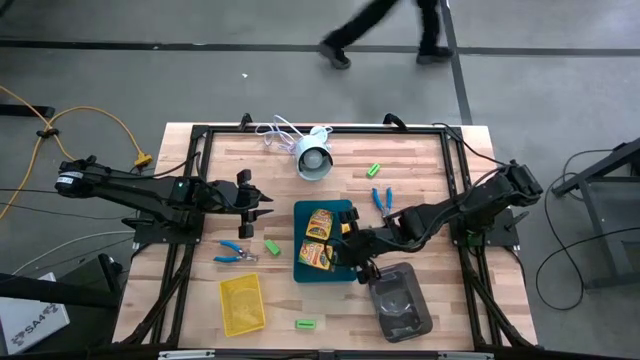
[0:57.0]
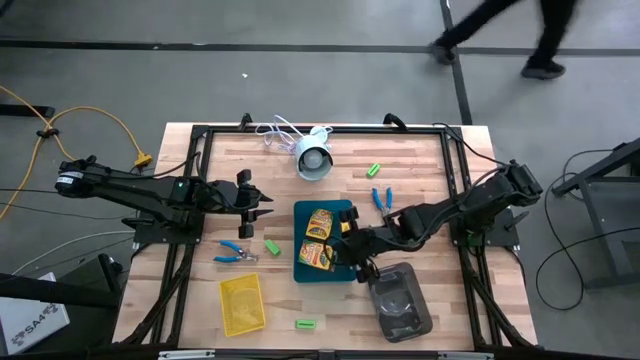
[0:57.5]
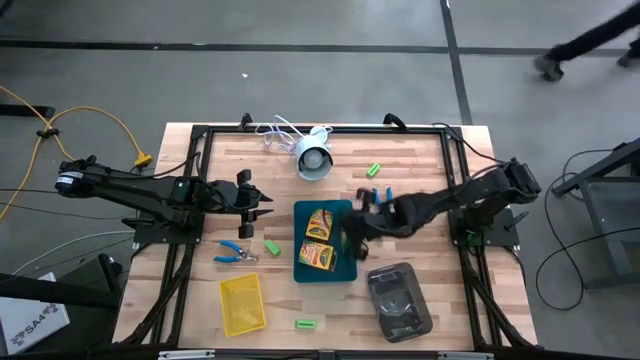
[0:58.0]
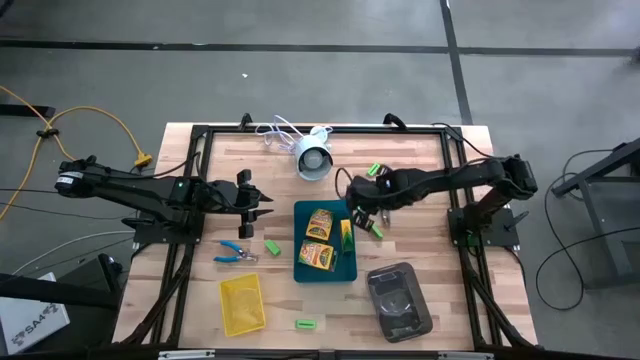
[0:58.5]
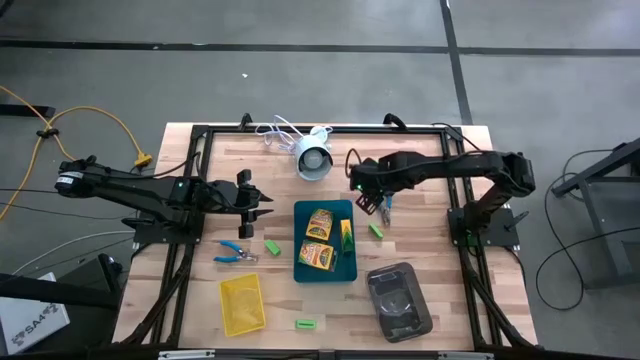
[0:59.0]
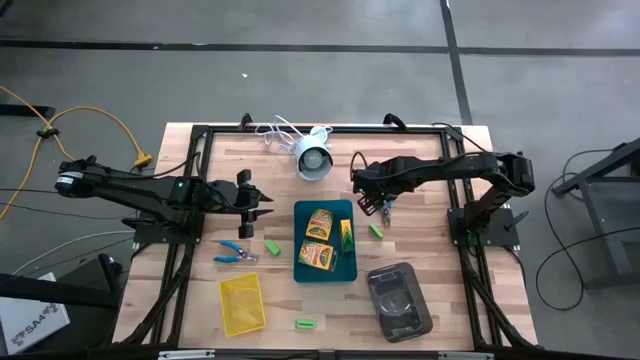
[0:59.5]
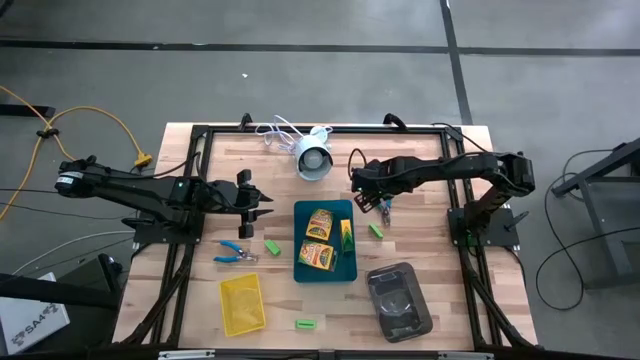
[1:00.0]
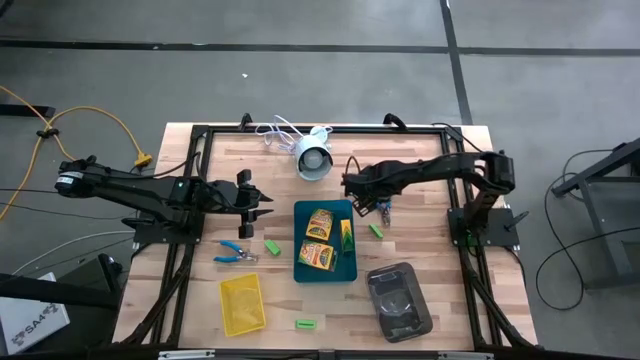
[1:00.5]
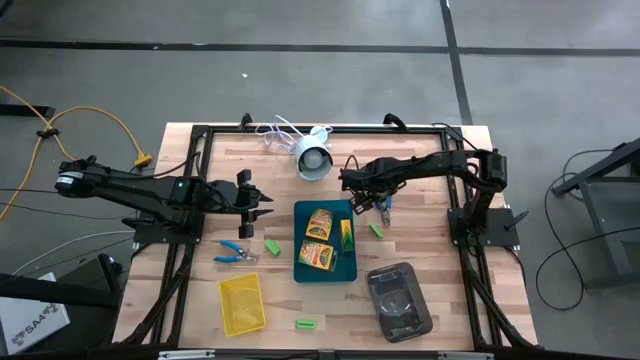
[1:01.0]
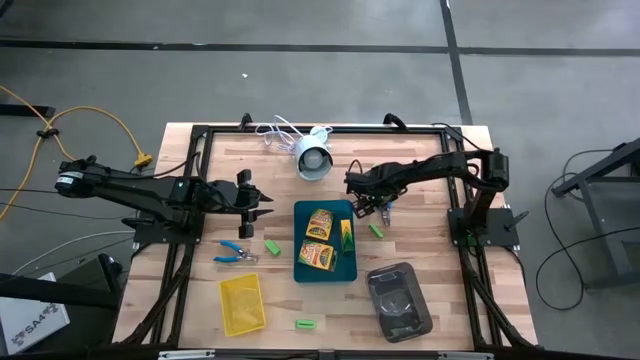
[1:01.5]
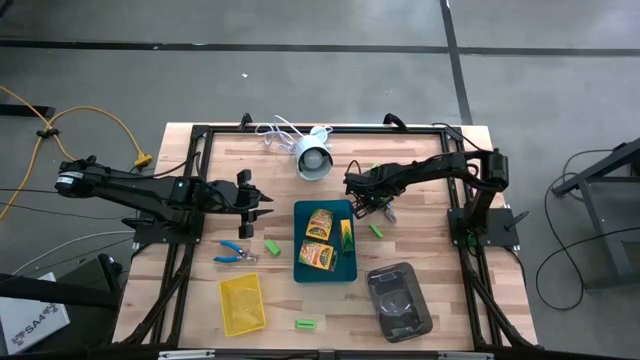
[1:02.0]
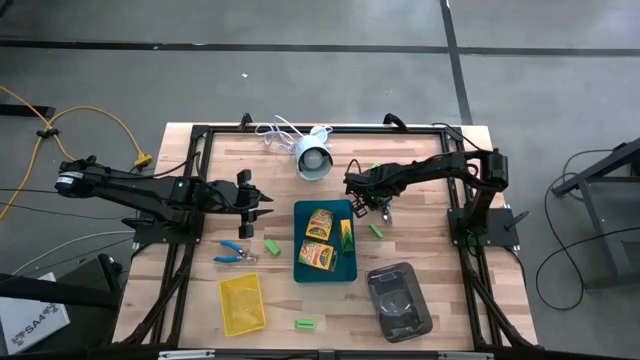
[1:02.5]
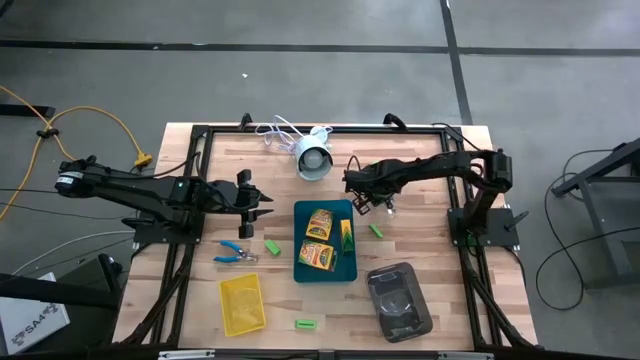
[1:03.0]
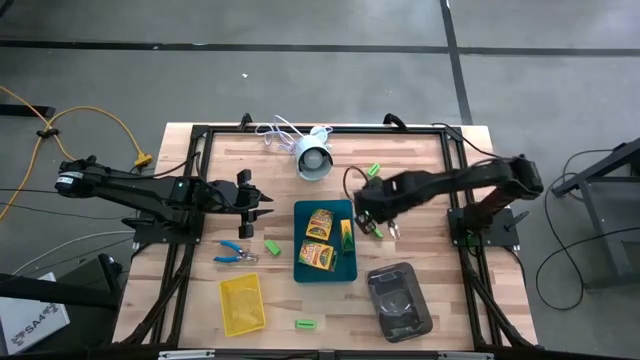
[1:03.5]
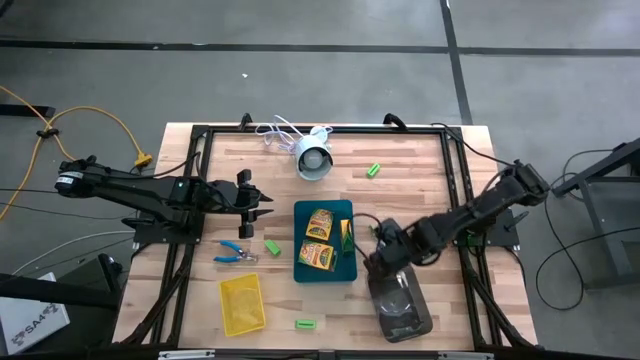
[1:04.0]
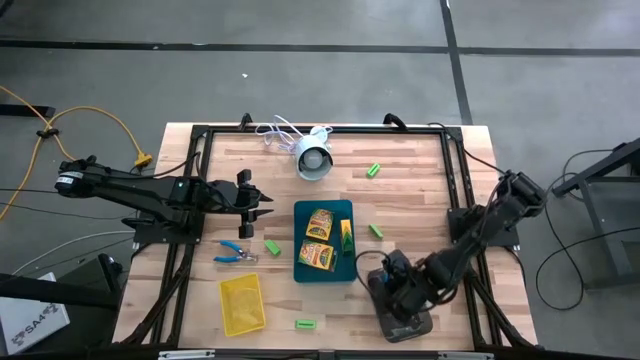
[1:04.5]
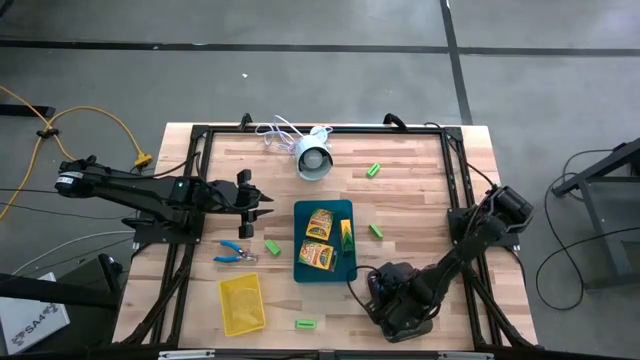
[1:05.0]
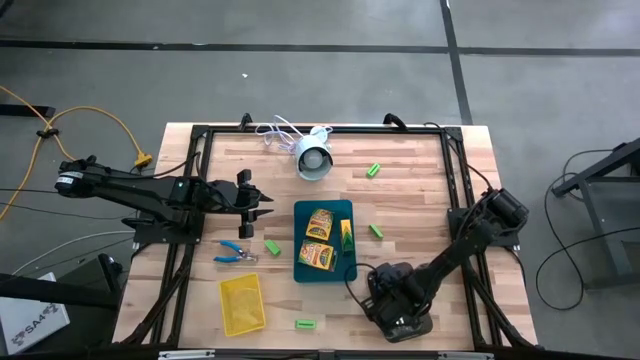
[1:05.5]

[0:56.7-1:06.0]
Task: Pick & Place School Supplies
Put the blue hole puncher into the black bin

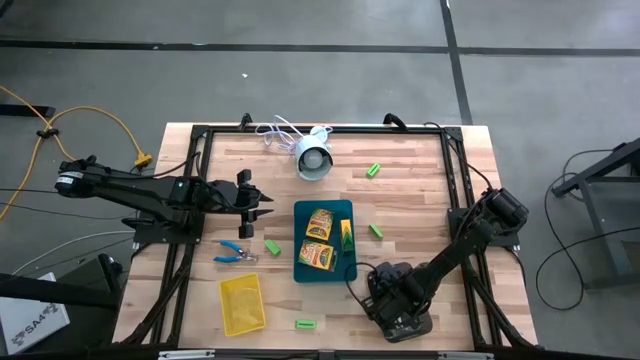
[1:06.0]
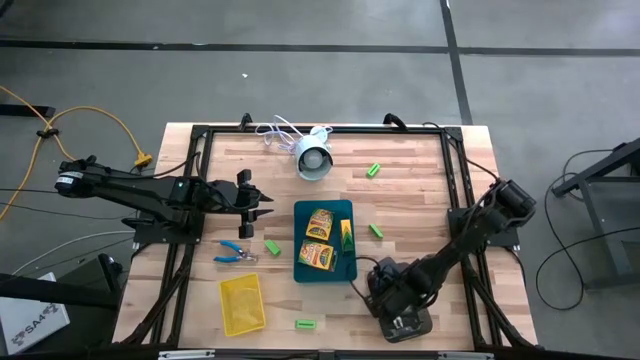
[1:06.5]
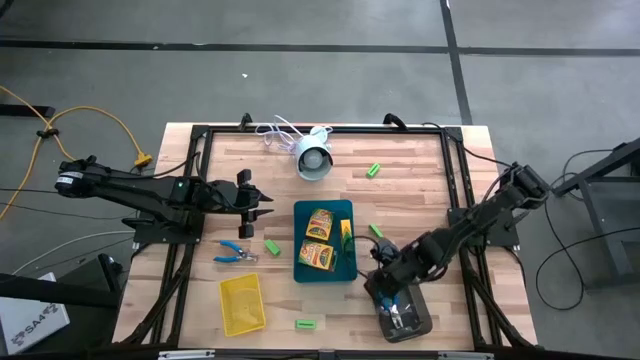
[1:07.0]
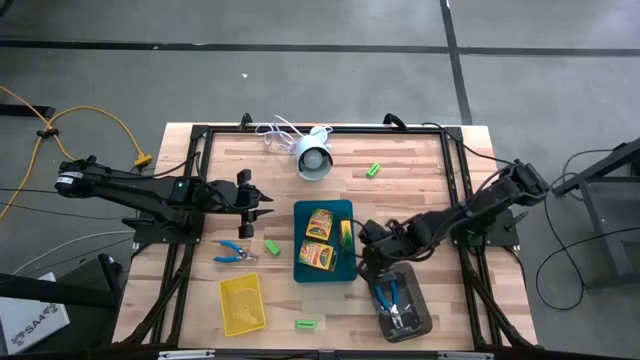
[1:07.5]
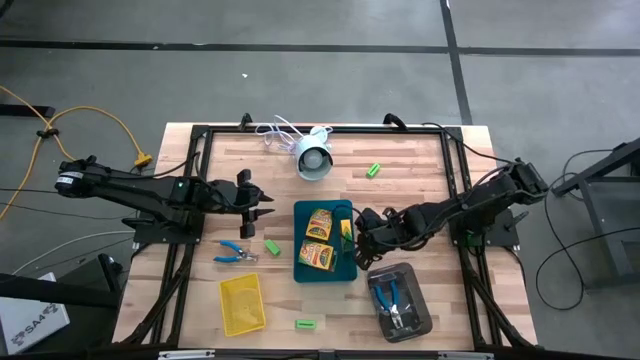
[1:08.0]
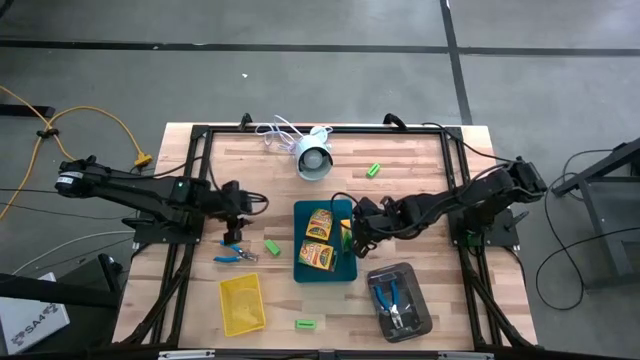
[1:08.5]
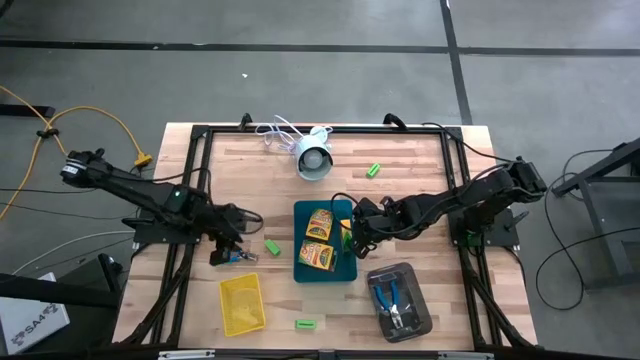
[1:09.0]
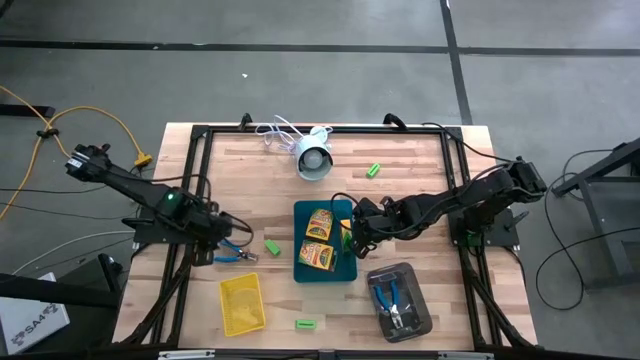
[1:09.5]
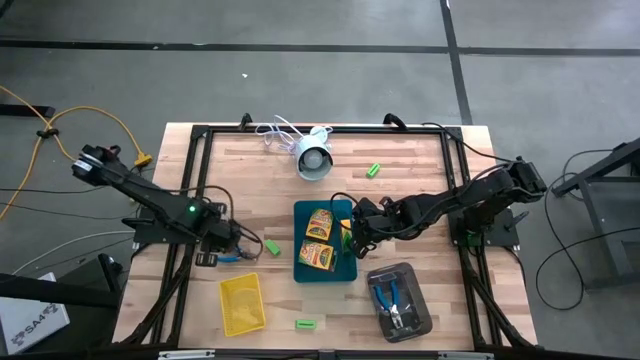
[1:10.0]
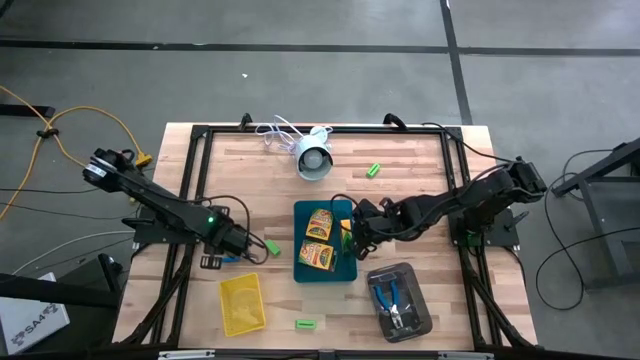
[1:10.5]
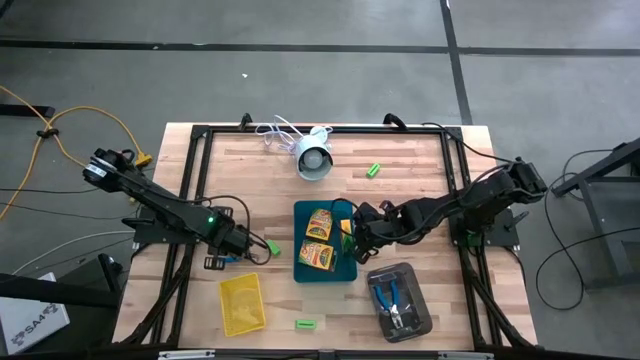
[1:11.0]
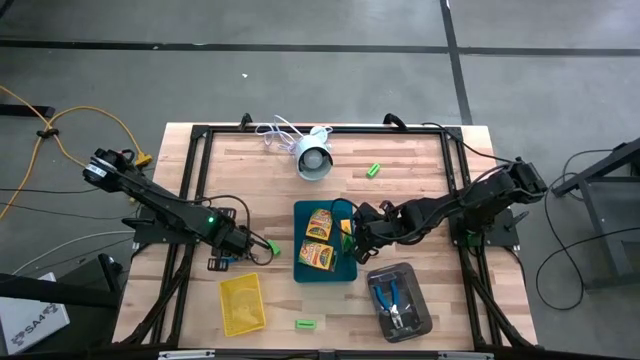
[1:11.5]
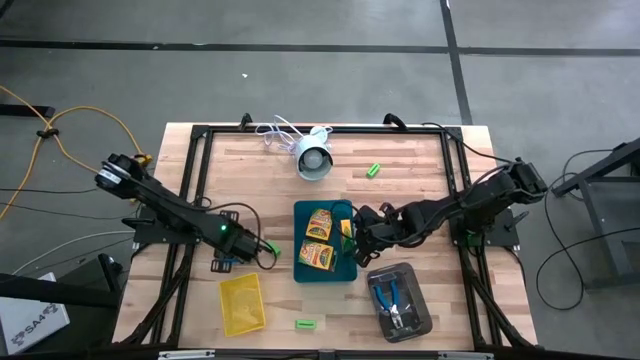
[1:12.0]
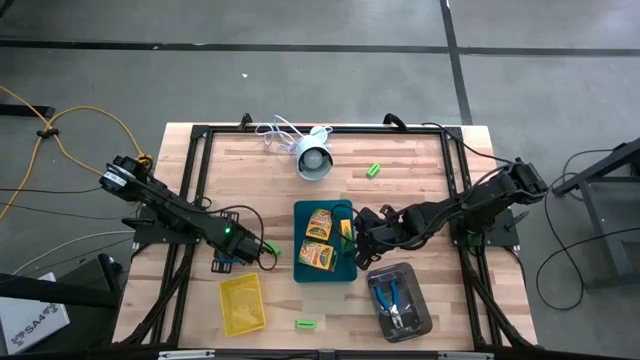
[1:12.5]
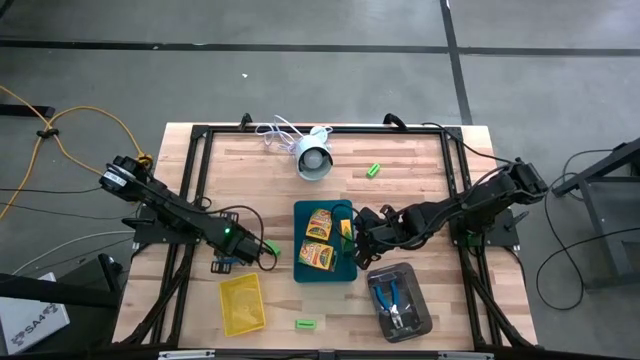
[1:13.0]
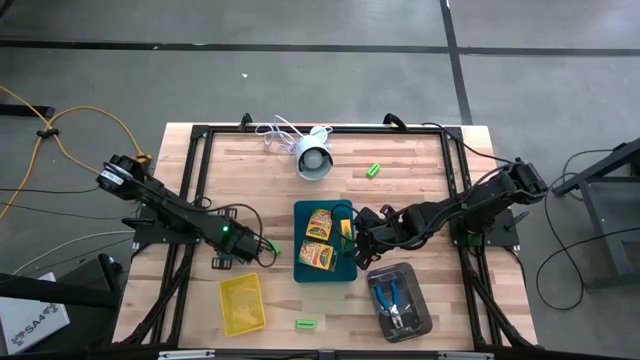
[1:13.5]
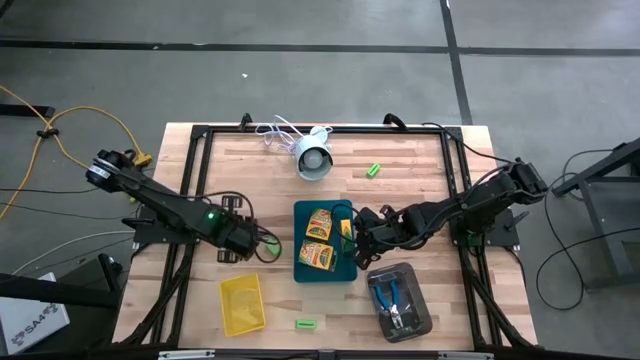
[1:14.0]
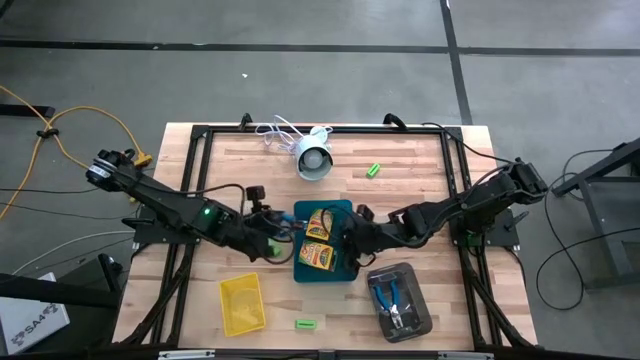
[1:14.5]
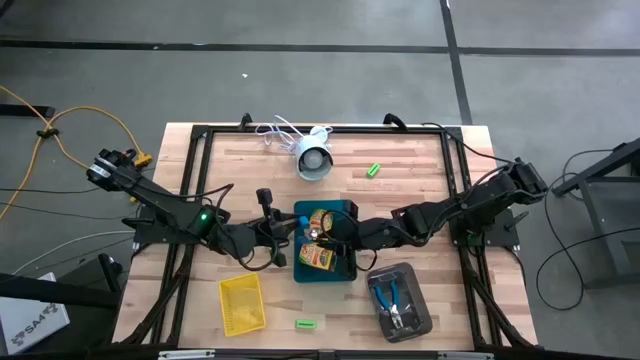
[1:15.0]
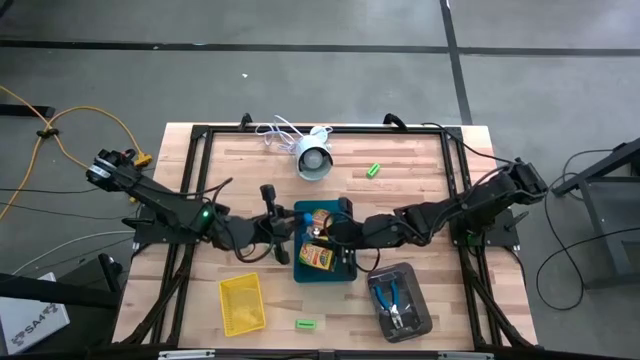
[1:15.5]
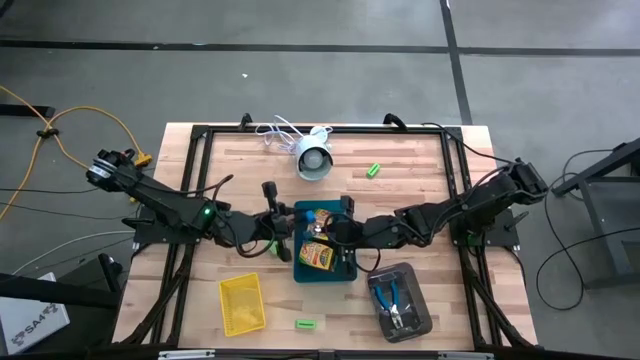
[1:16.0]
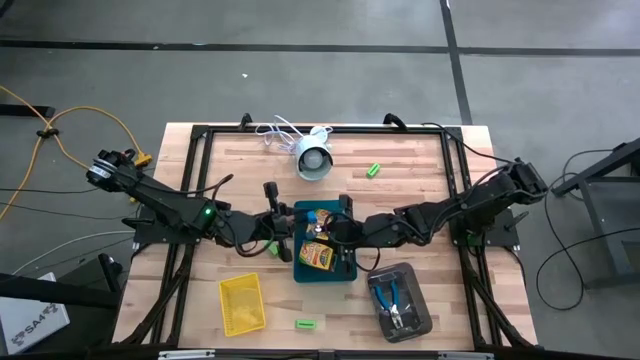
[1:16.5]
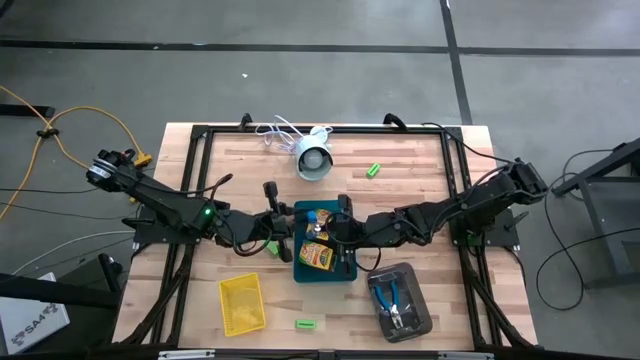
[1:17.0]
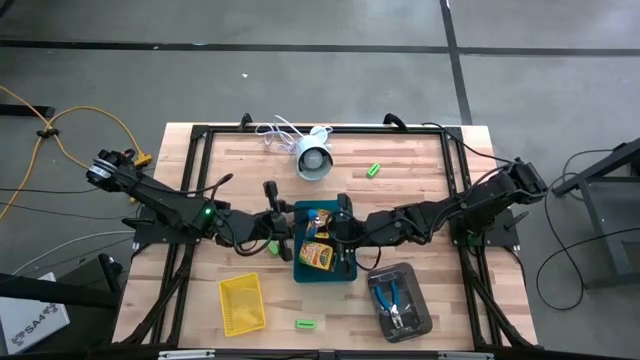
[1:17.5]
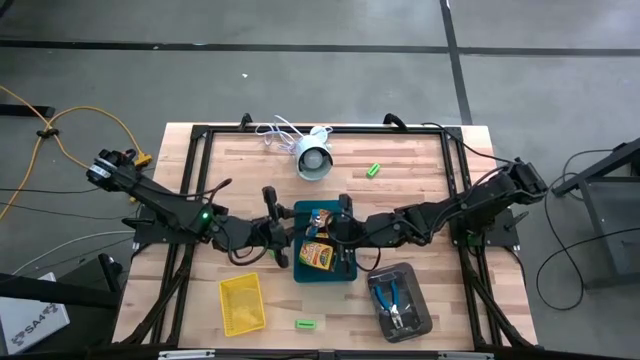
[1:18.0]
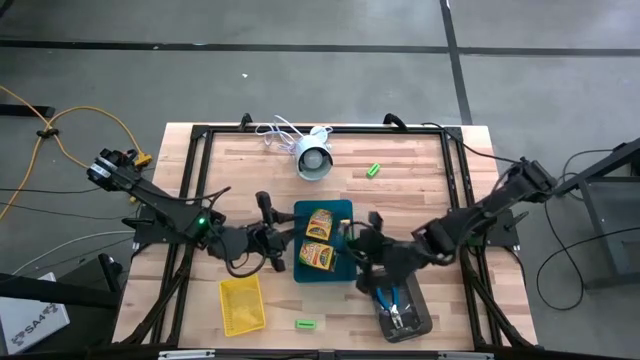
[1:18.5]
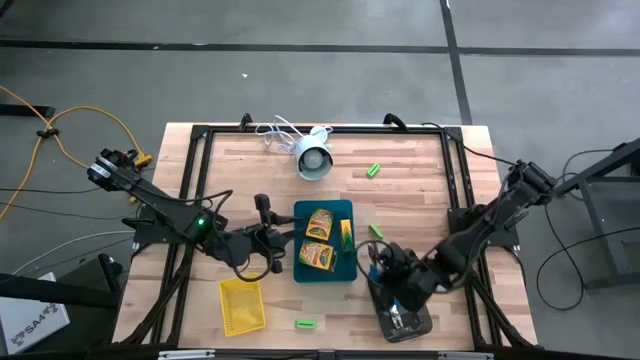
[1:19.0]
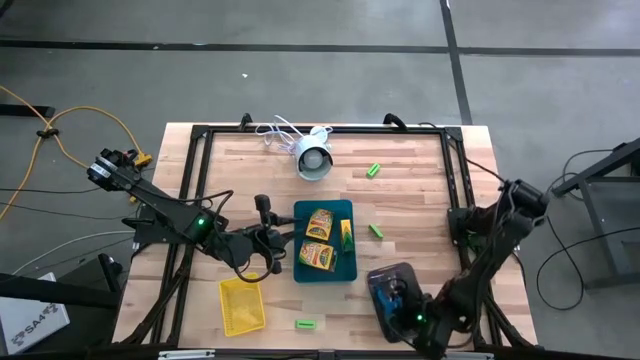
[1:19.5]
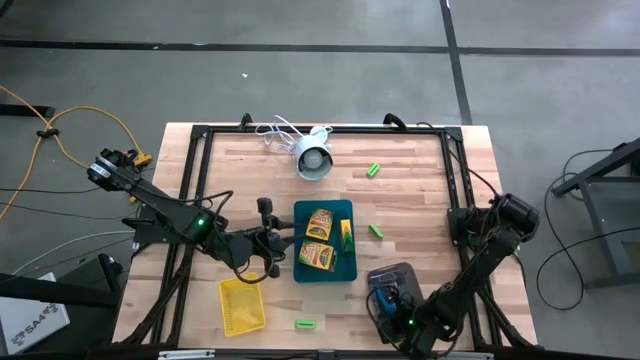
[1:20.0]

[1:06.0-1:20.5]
Put the blue hole puncher into the black bin
